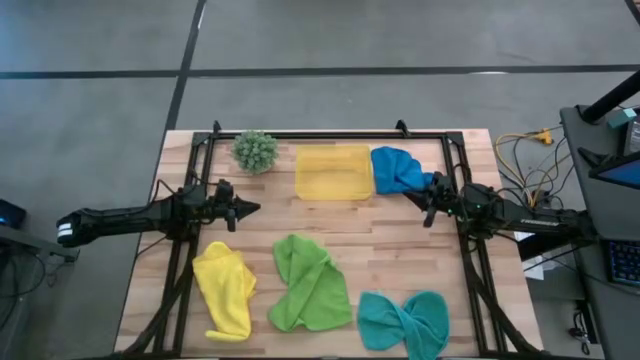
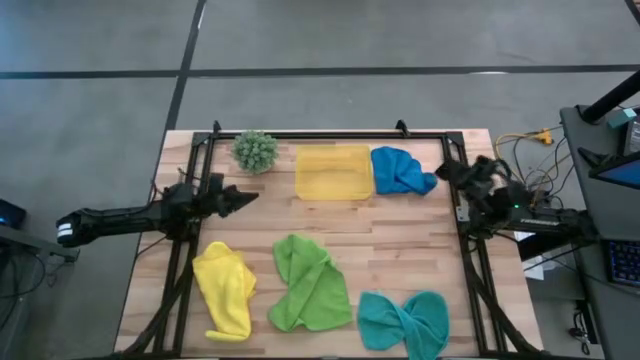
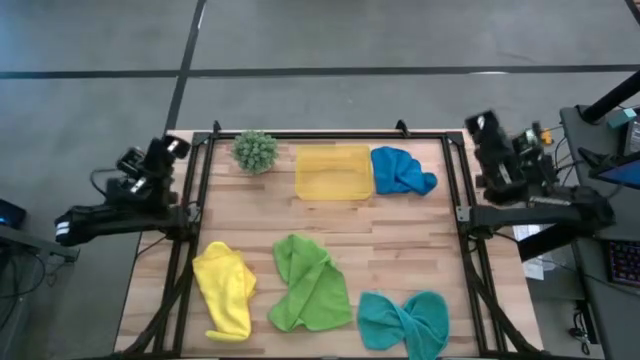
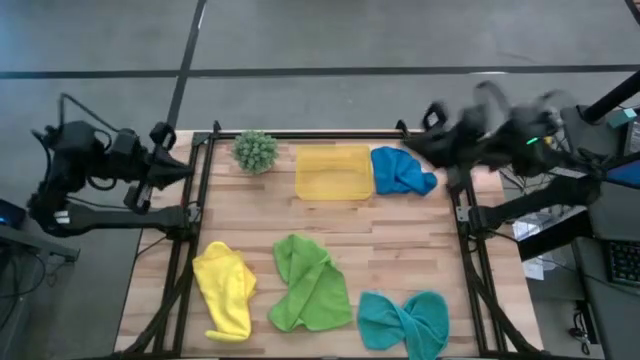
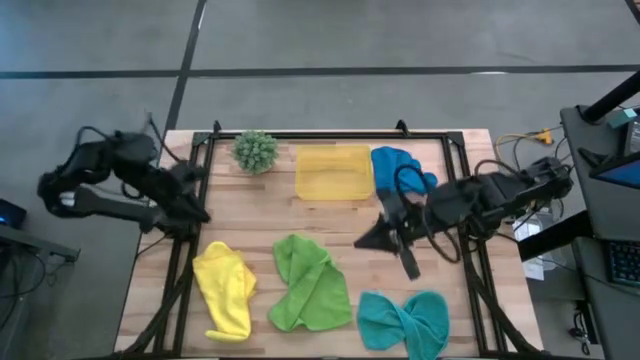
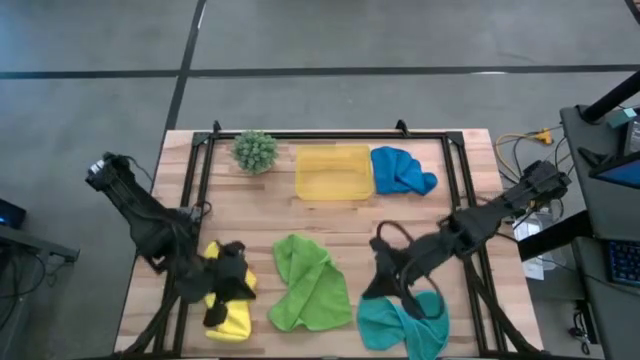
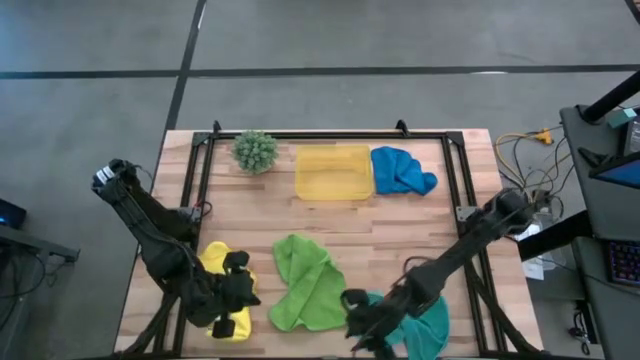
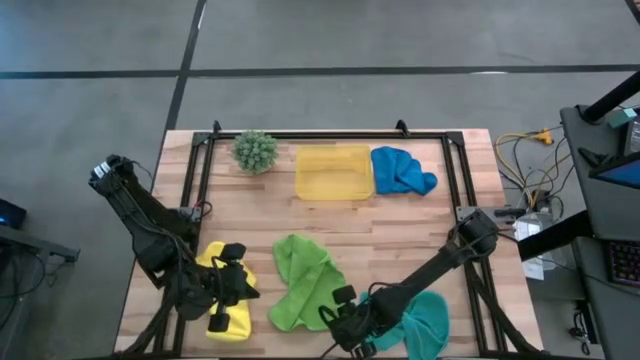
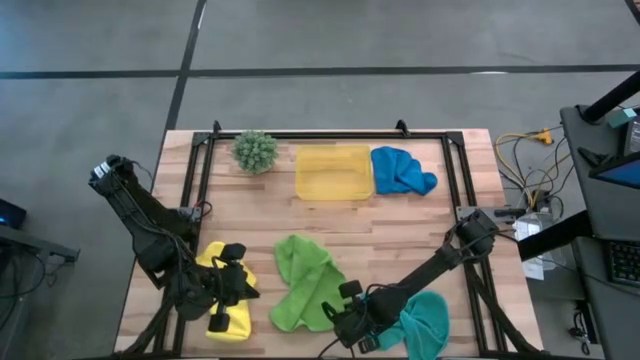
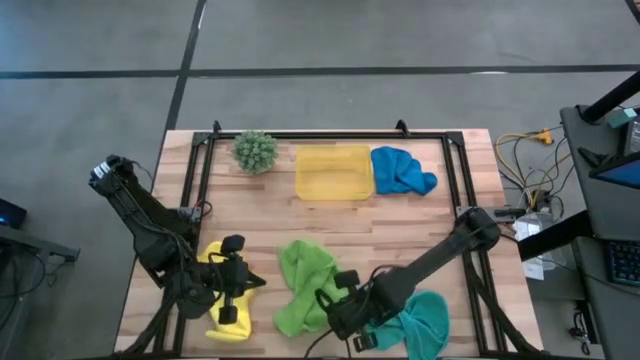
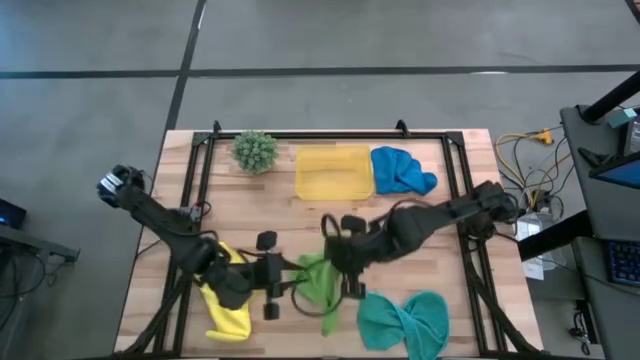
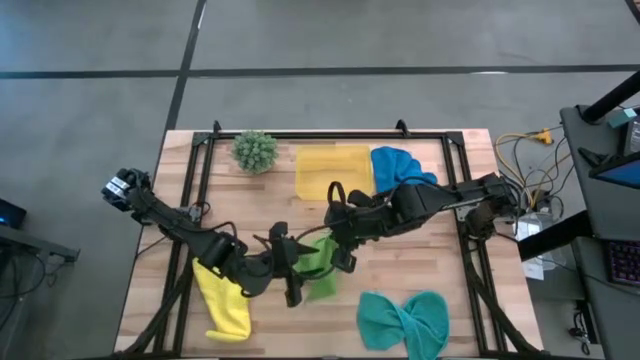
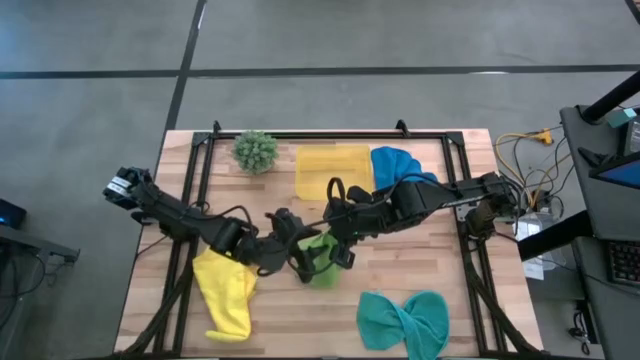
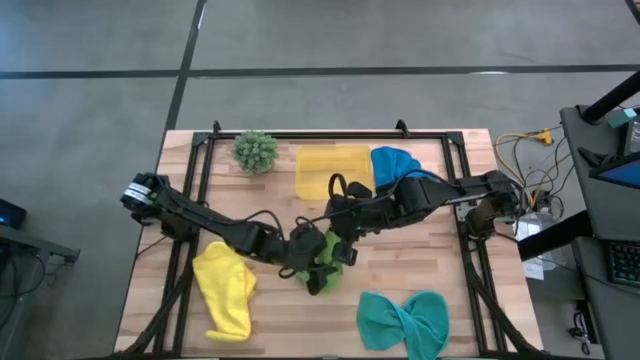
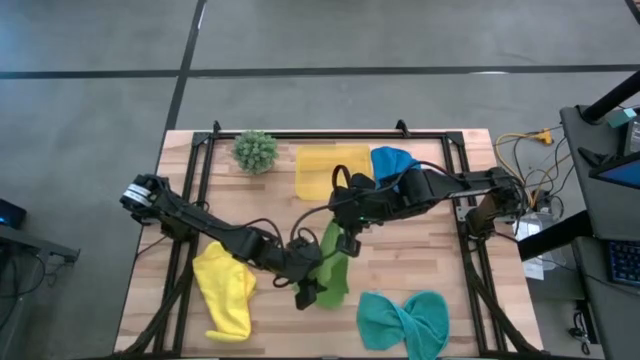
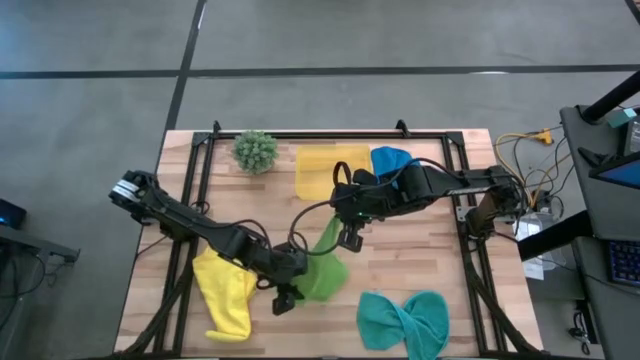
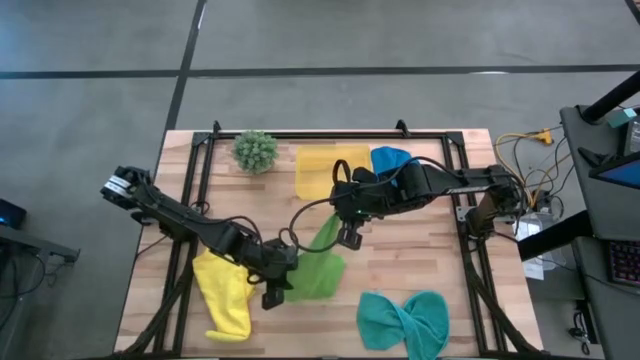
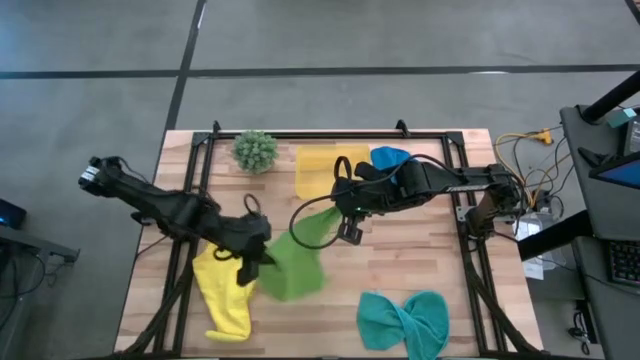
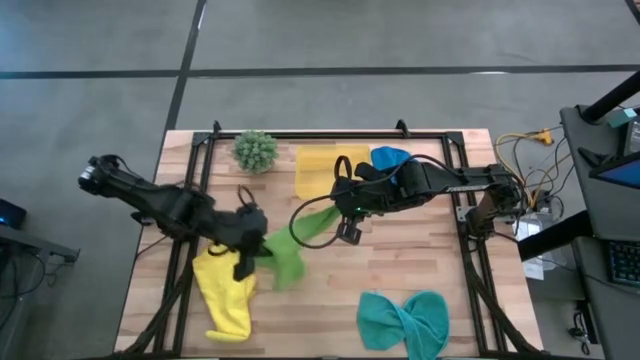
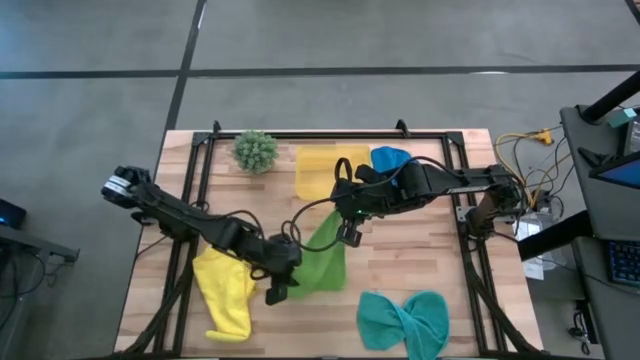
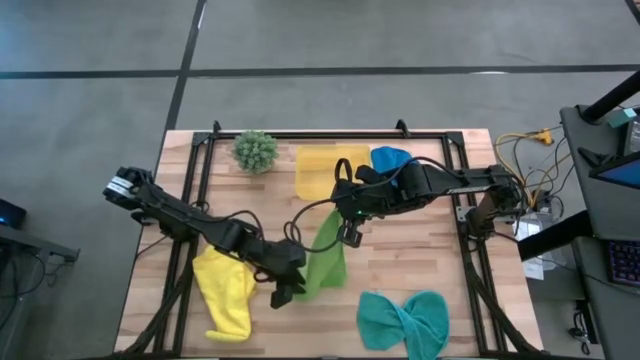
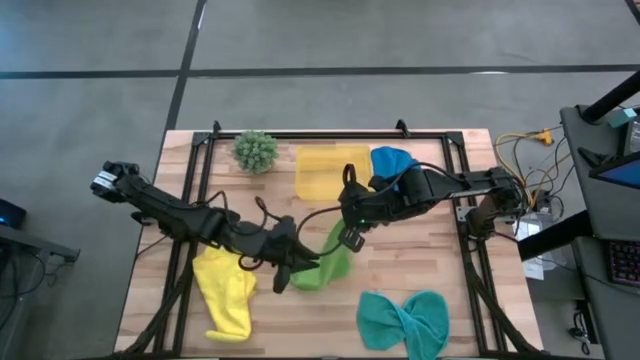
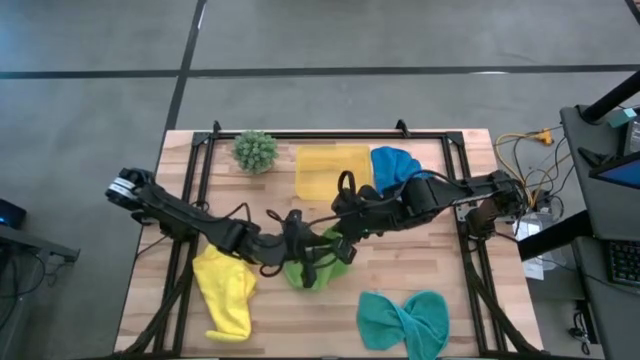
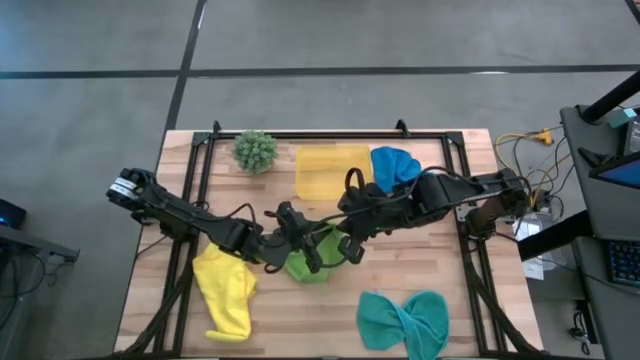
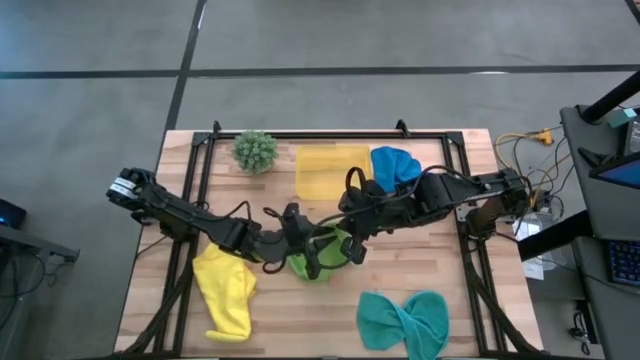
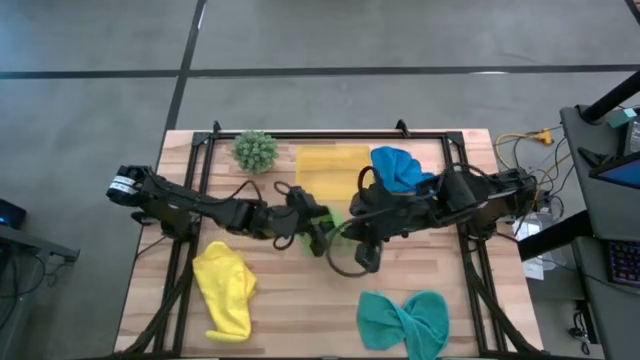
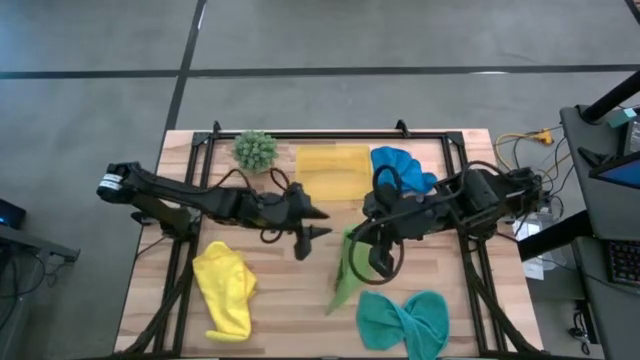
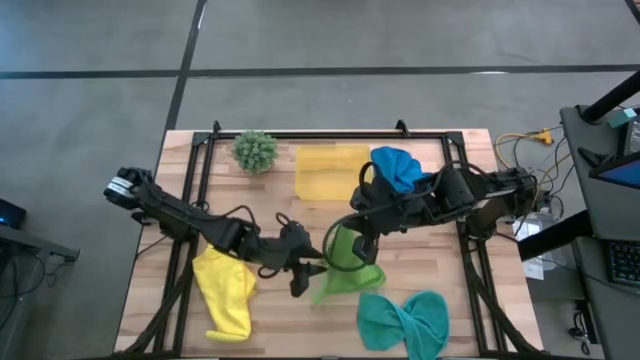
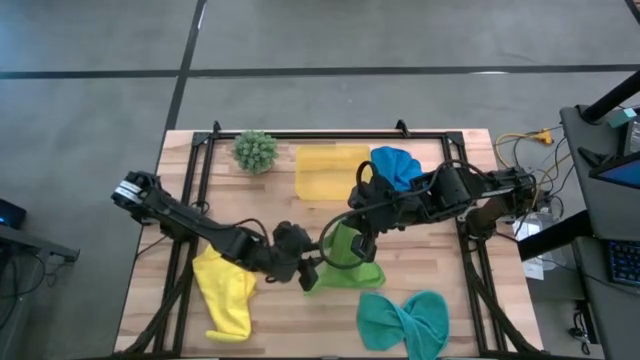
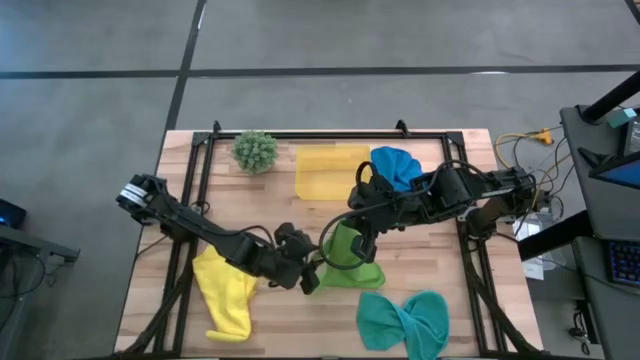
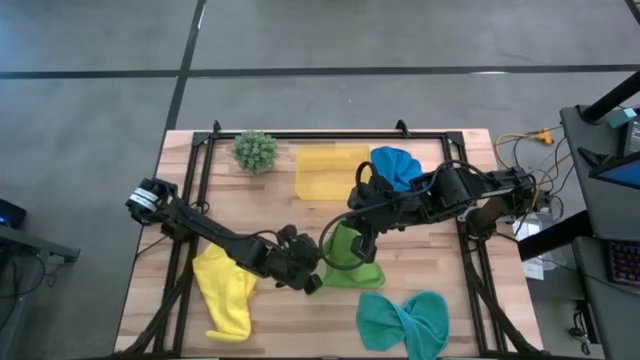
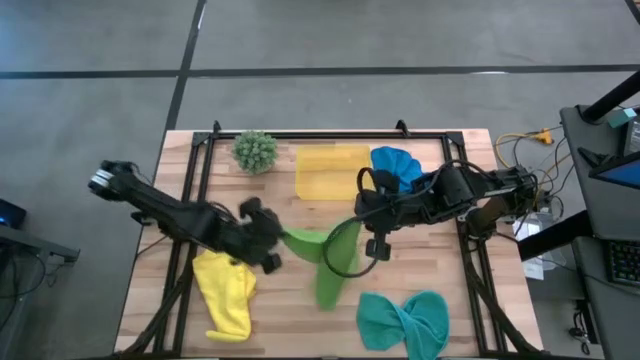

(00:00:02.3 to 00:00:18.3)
Task: Fold microfiber towels
Fold the green towel

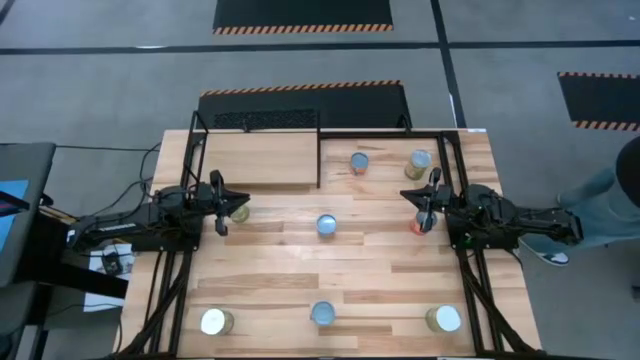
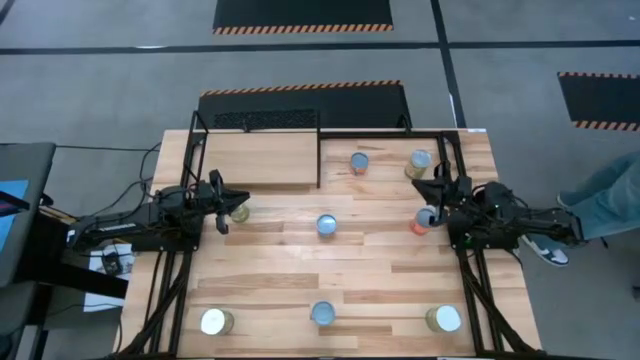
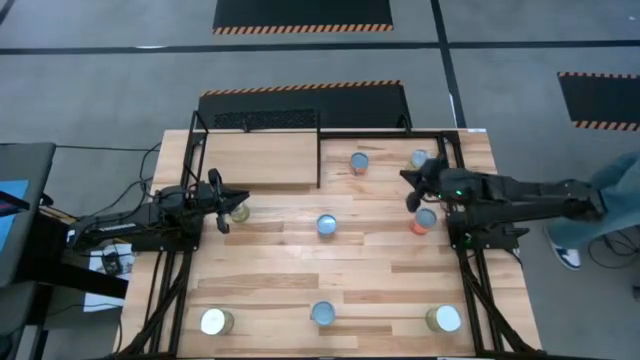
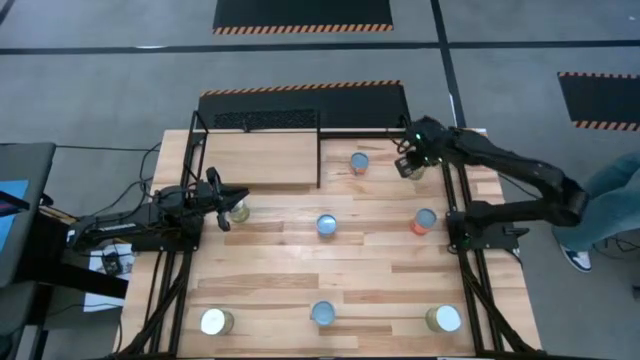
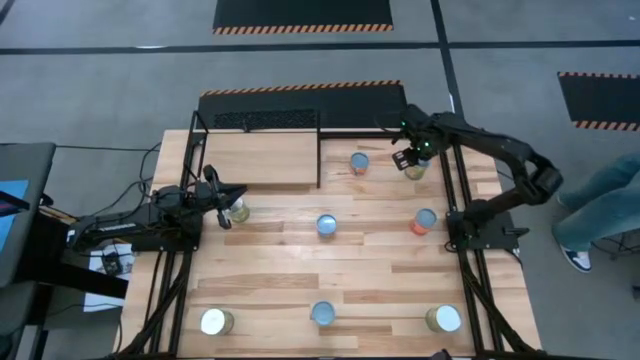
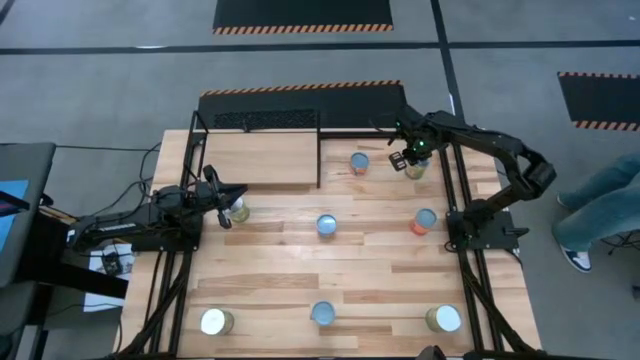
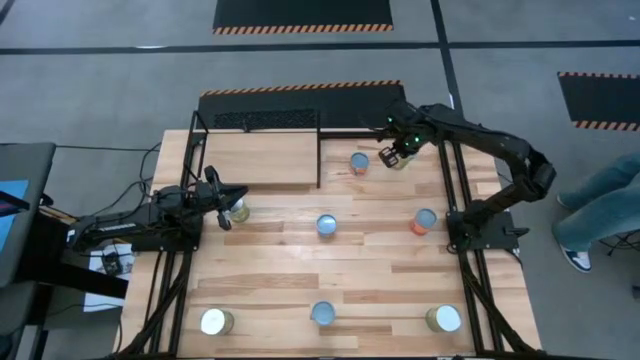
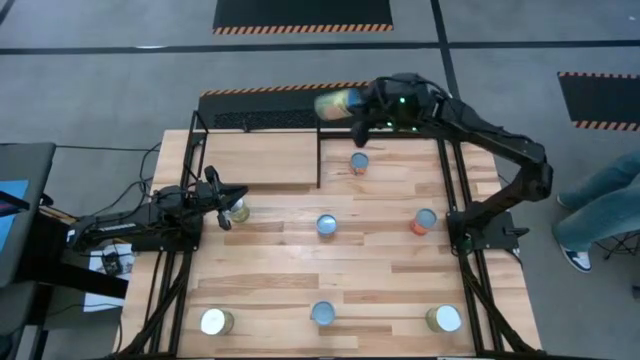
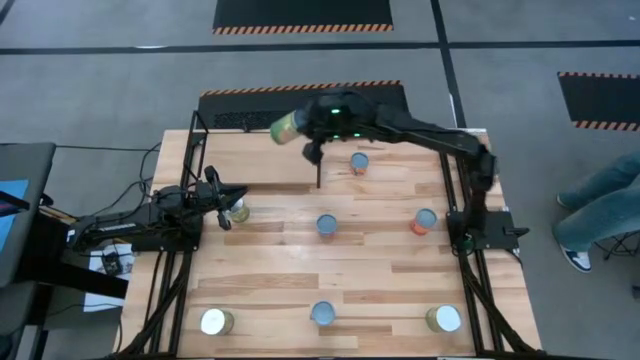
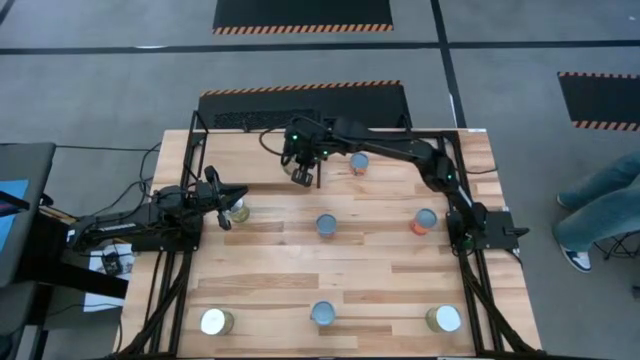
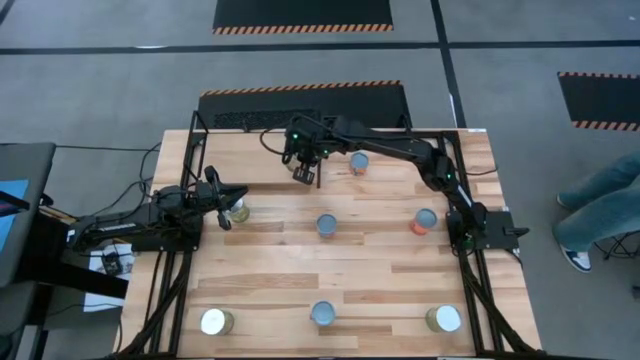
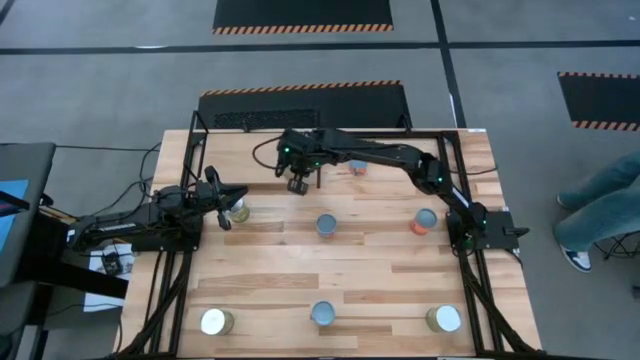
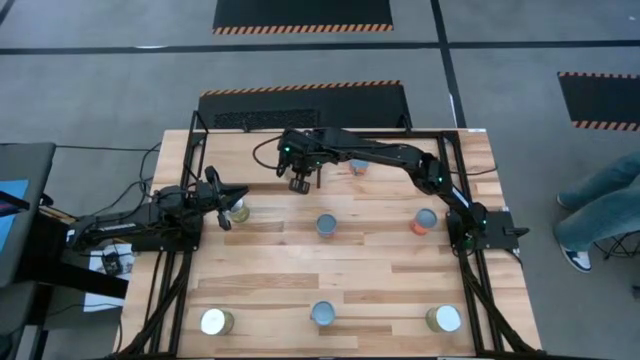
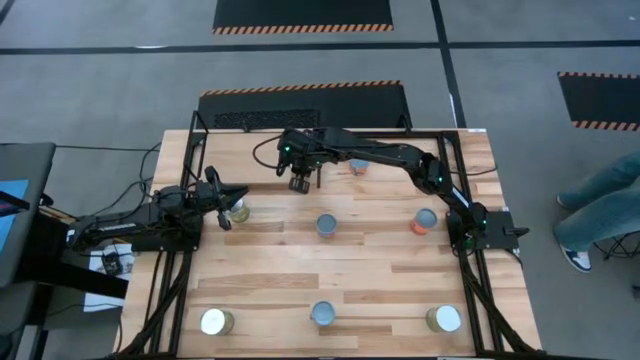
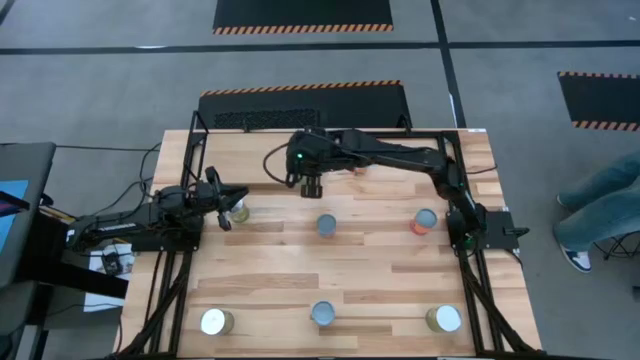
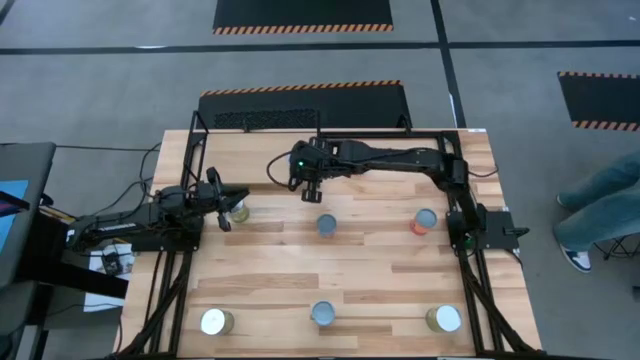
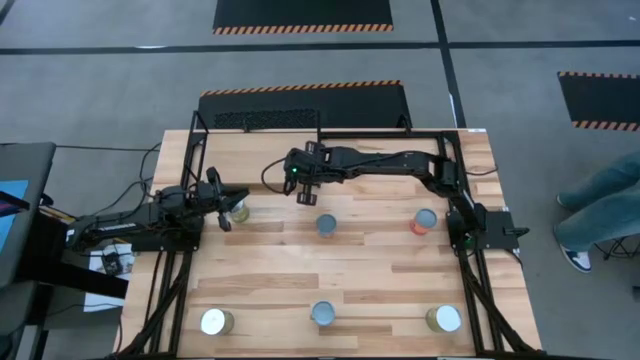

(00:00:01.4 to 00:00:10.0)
Task: Pick and place cans onto a shelf
Put the top large canned oranges on the shelf
